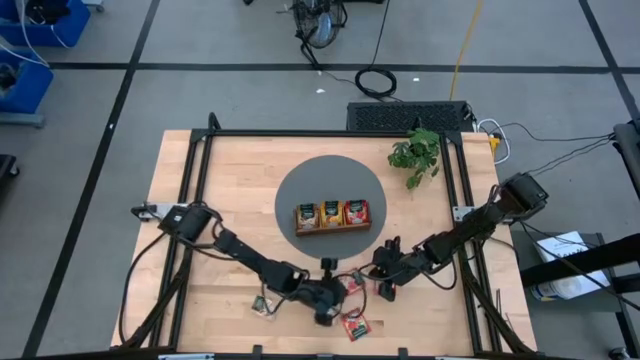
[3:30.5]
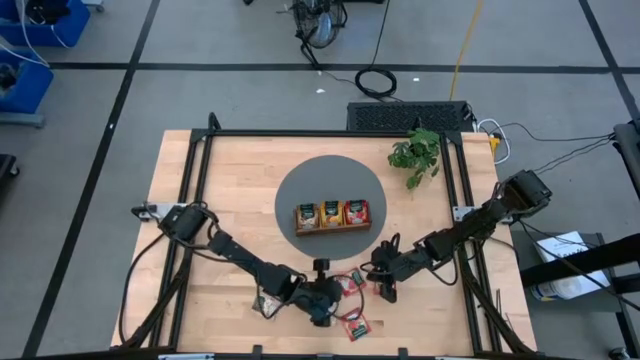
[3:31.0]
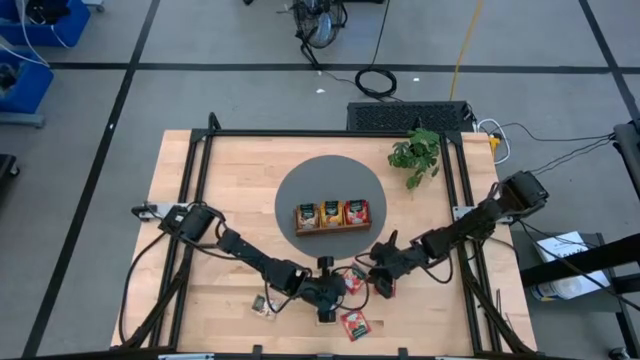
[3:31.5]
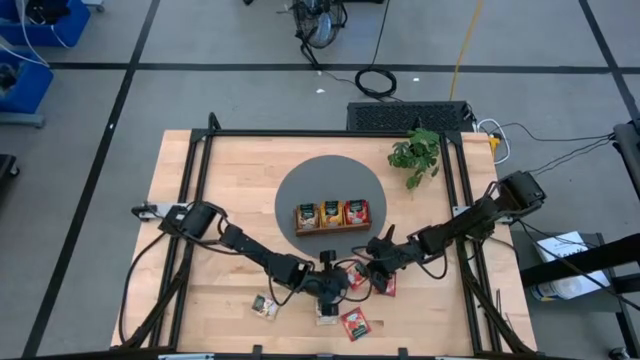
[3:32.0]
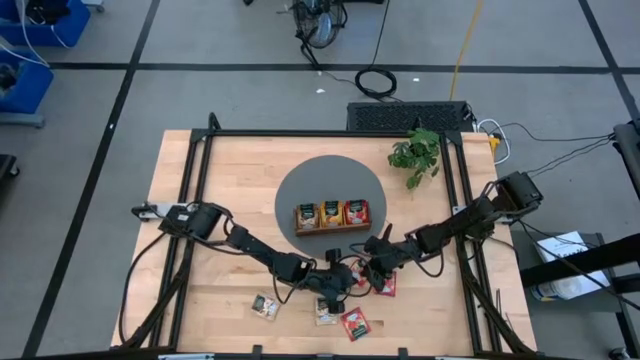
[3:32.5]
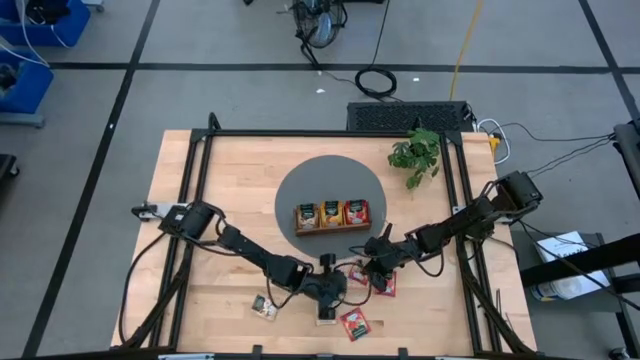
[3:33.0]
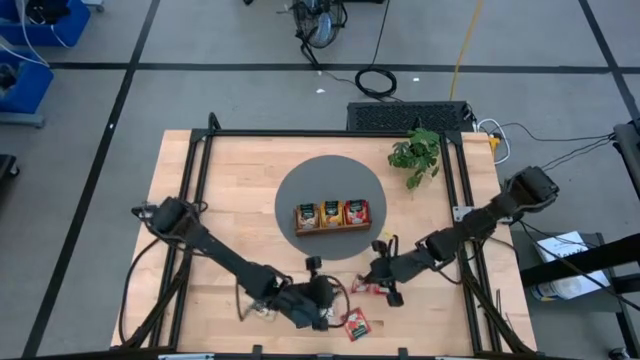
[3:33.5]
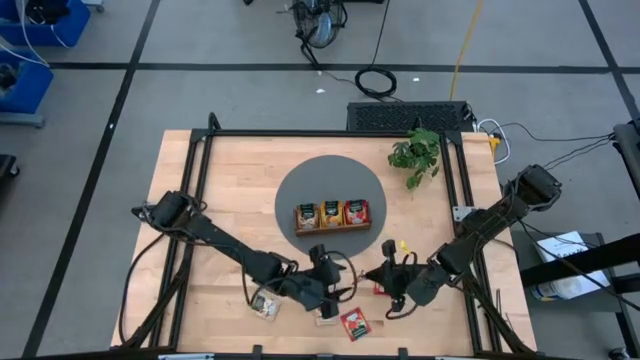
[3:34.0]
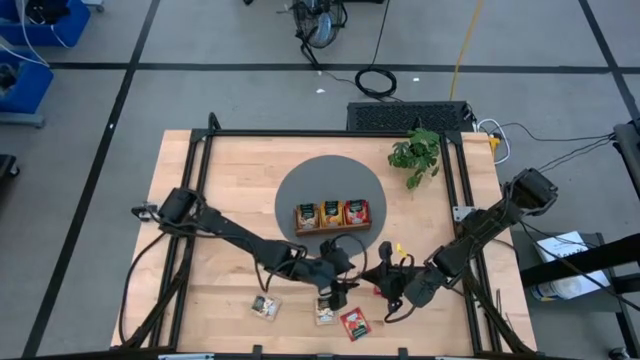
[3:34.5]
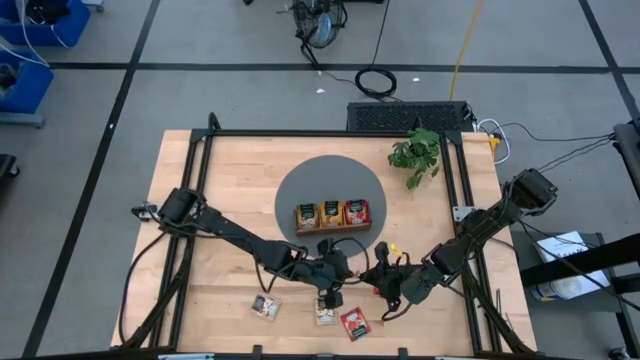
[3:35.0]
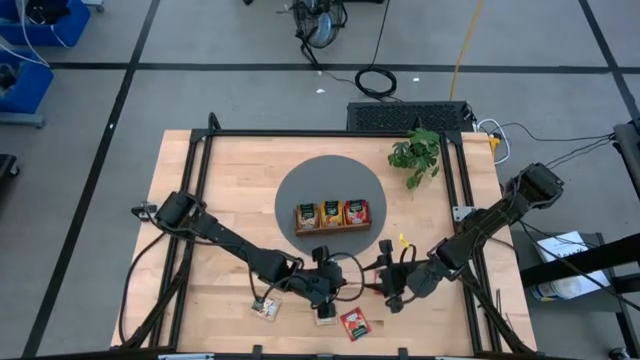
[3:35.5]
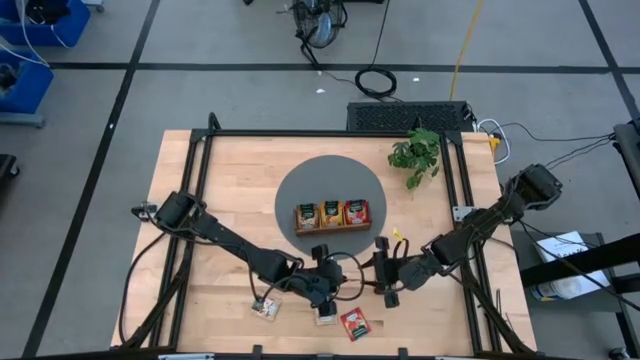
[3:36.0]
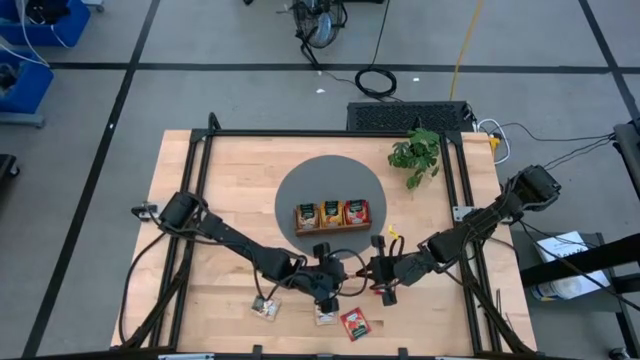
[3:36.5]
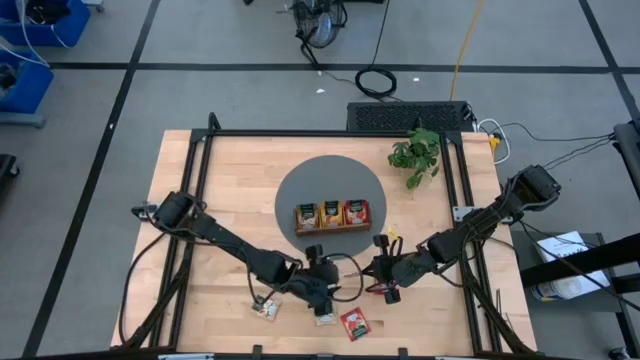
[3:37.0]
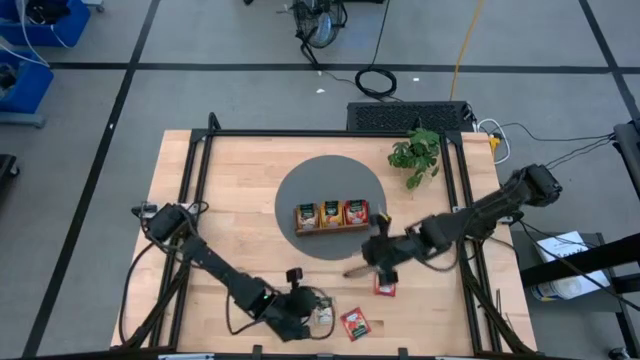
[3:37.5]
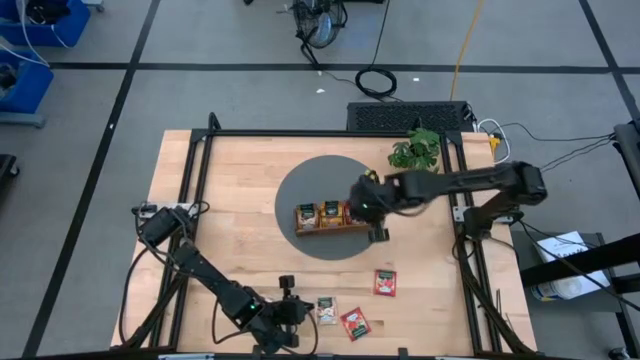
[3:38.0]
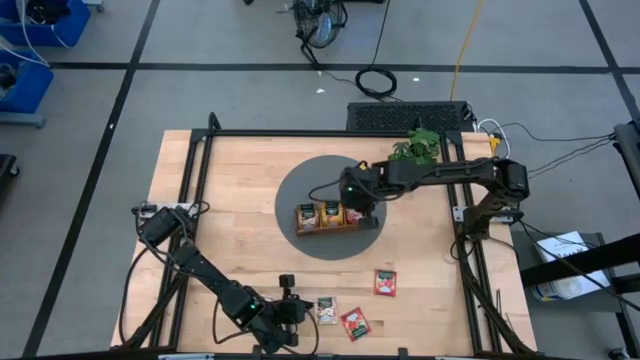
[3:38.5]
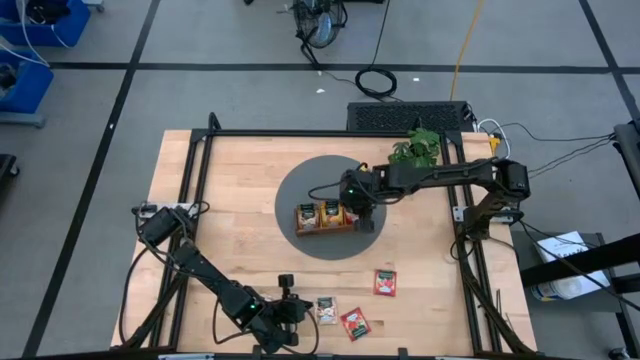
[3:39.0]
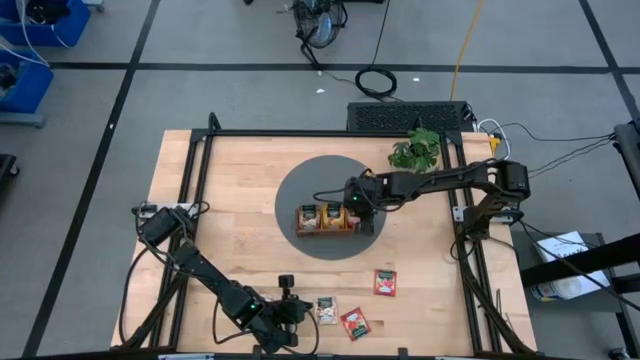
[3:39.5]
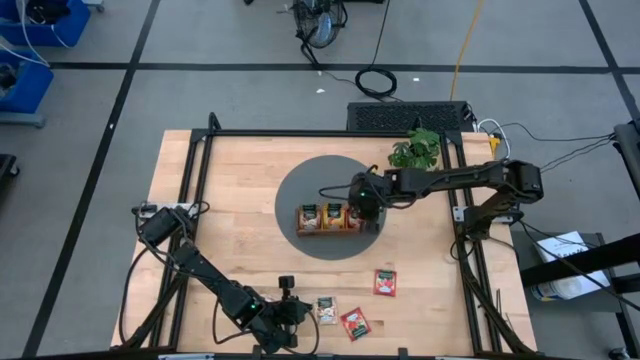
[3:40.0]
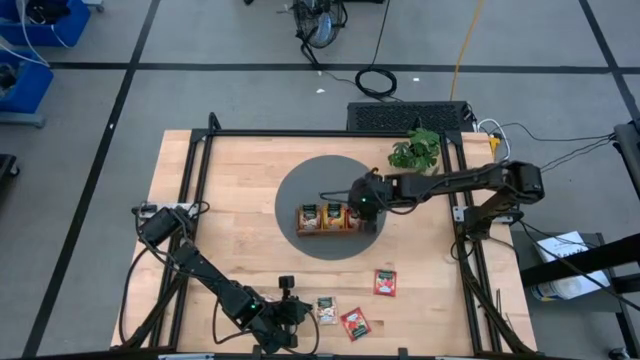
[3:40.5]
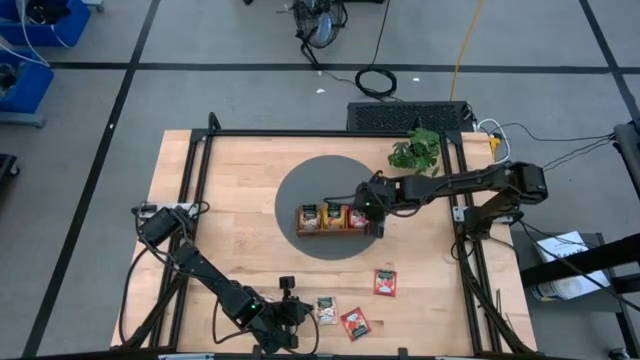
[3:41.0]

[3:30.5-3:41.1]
Task: Pick & Place Tea
Put the strawberry tea sachet into the right compartment of the wooden organizer

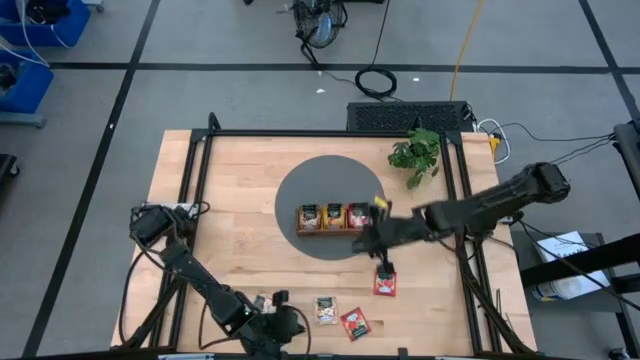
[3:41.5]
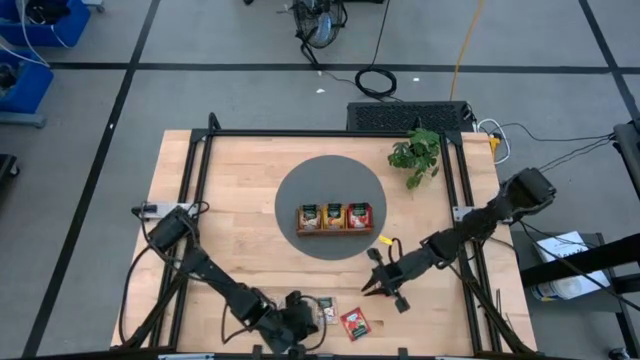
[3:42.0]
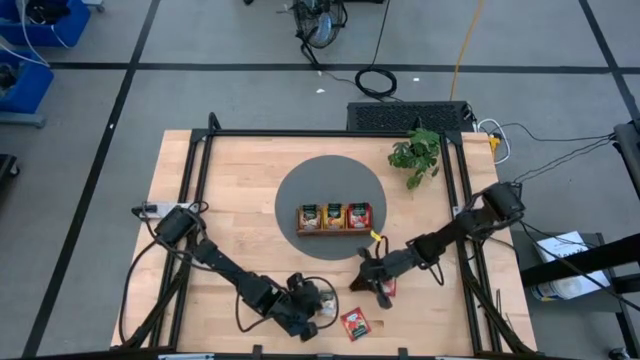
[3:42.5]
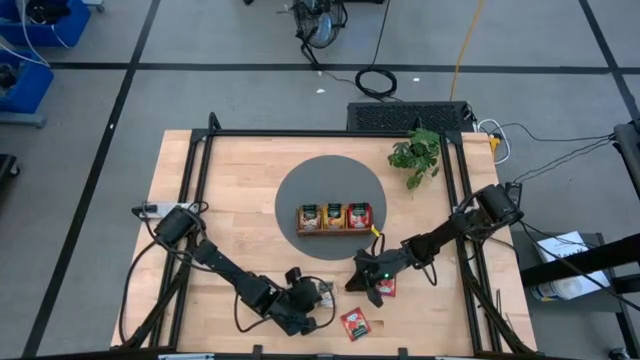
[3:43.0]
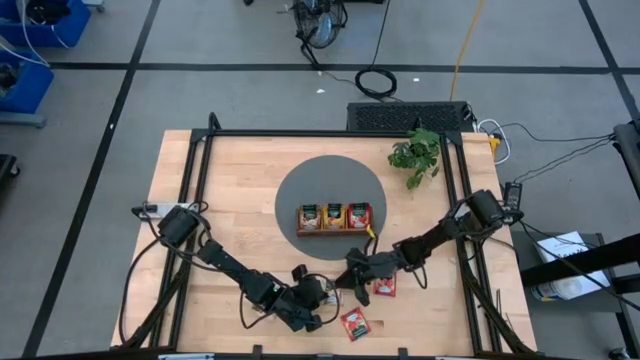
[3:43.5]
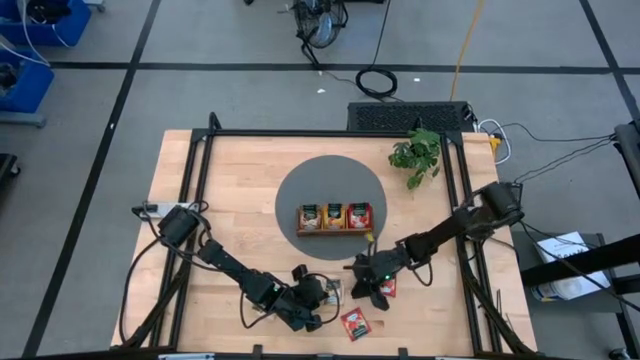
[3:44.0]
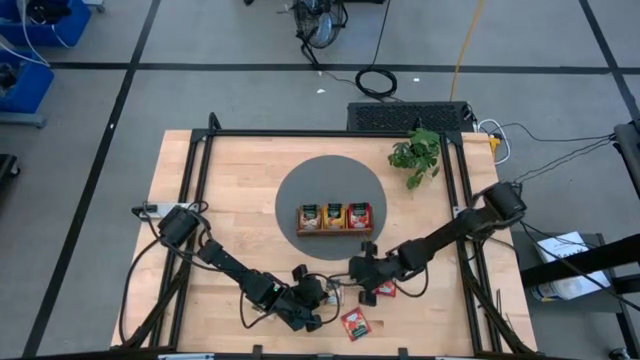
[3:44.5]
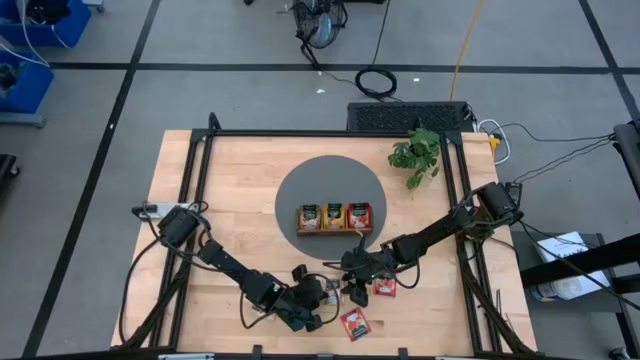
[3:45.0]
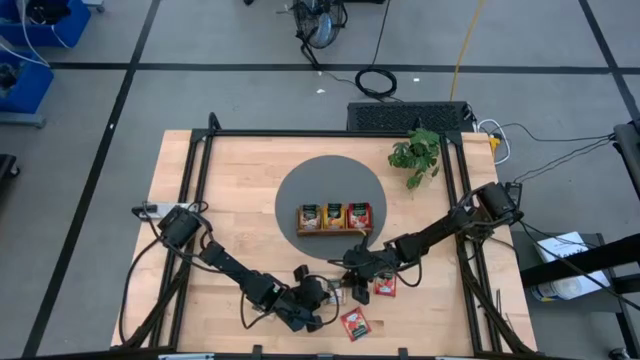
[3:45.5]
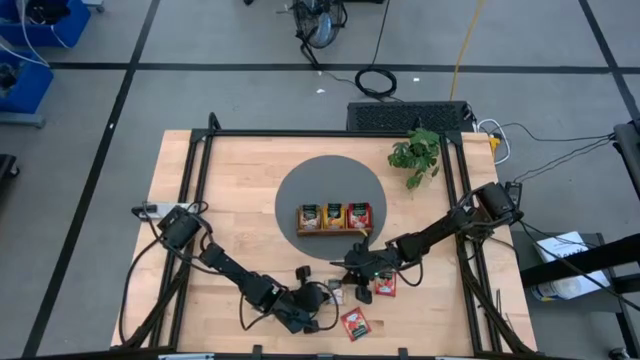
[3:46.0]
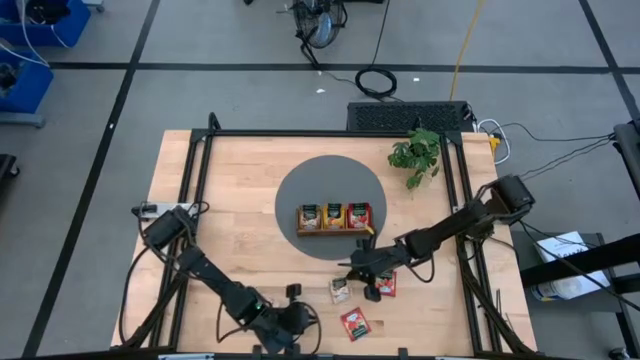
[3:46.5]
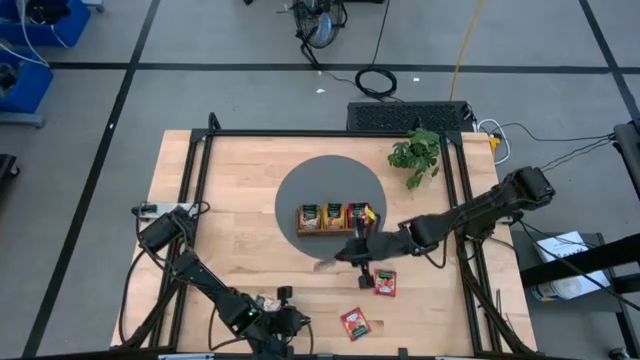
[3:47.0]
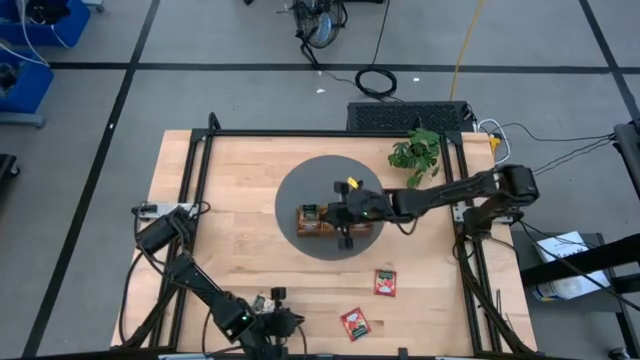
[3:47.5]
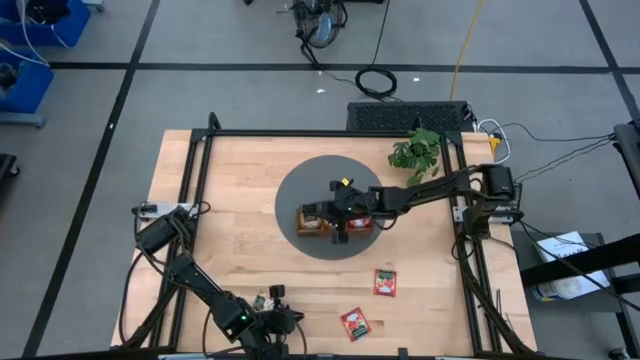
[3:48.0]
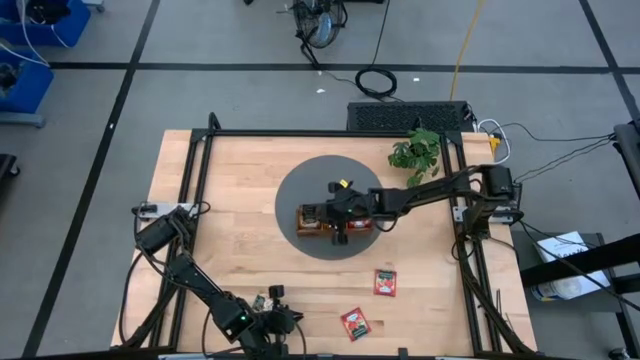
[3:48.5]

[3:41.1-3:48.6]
Put the cinnamon tea sachet into the left compartment of the wooden organizer

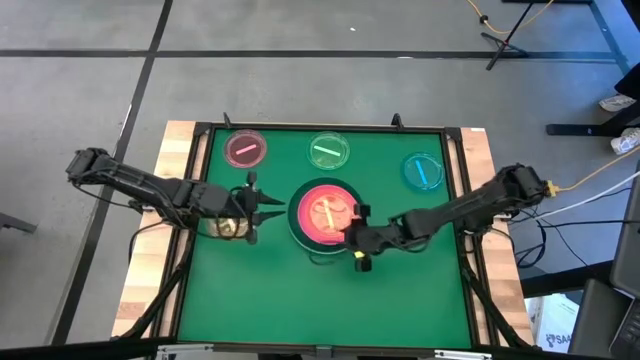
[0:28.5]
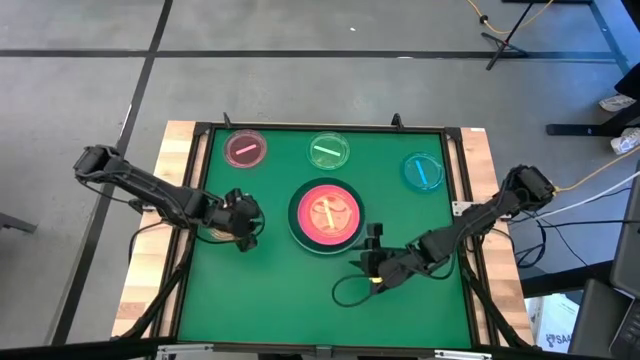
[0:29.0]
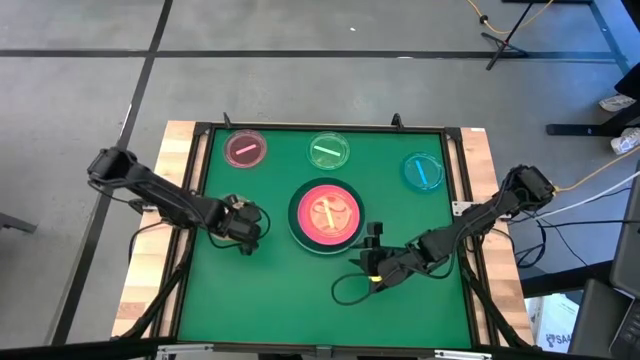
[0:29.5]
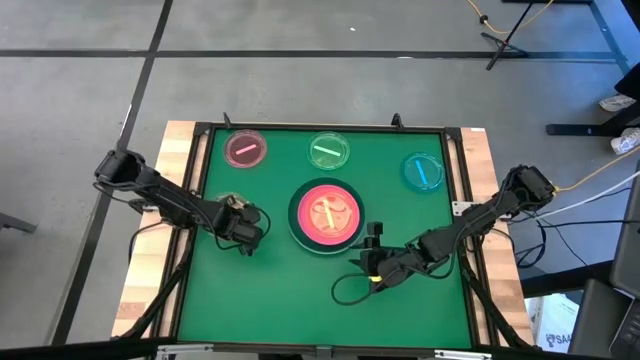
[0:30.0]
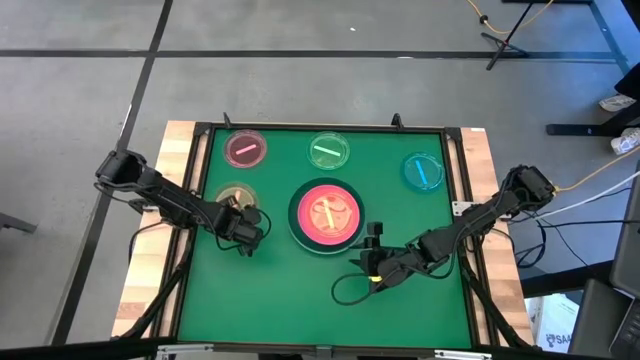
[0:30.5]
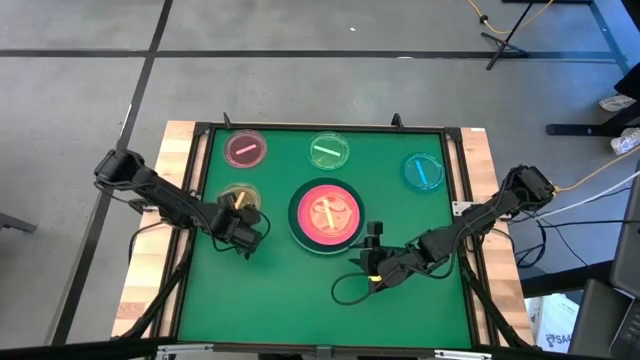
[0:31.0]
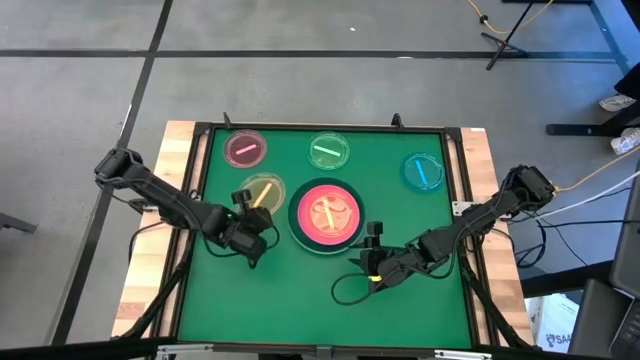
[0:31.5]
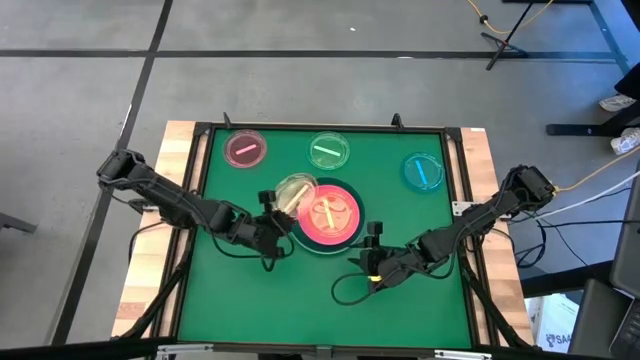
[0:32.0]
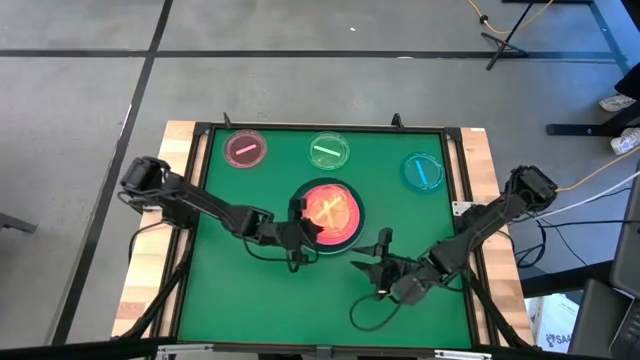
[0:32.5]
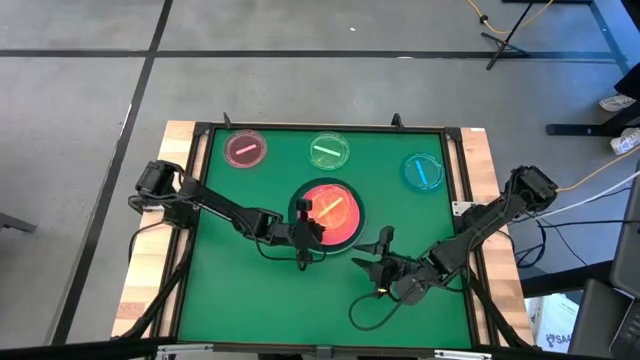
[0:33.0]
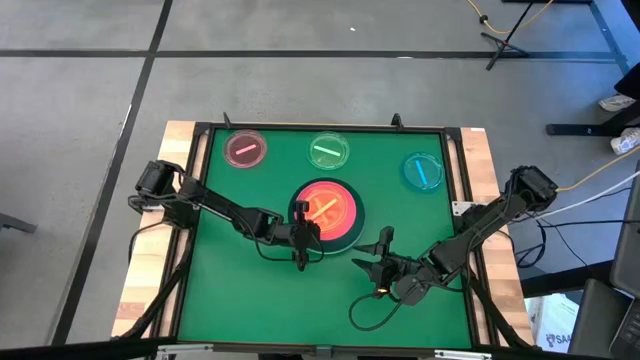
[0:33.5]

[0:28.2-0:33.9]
Task: Stack plastic plates
Stack the left orange transparent plate on the right orange transparent plate
